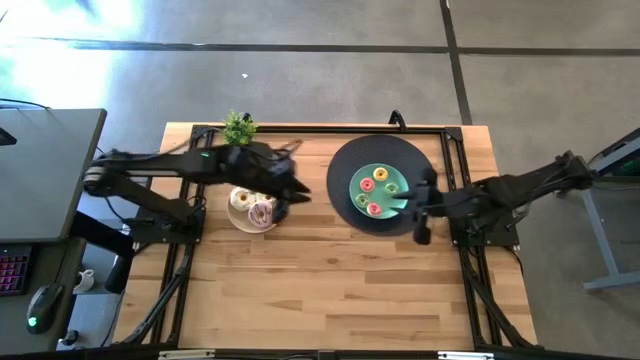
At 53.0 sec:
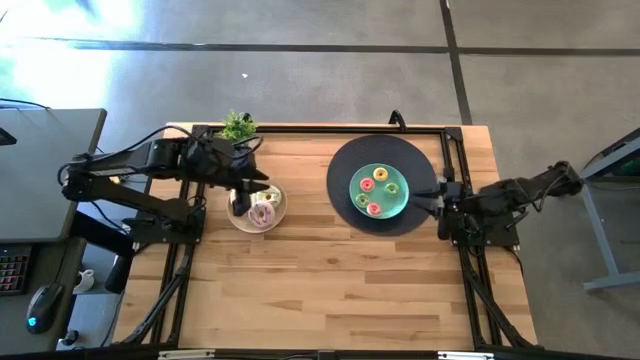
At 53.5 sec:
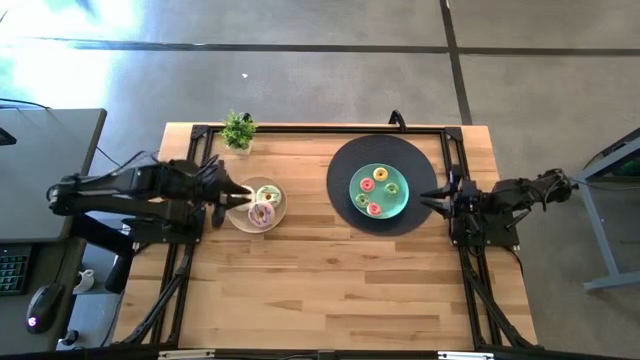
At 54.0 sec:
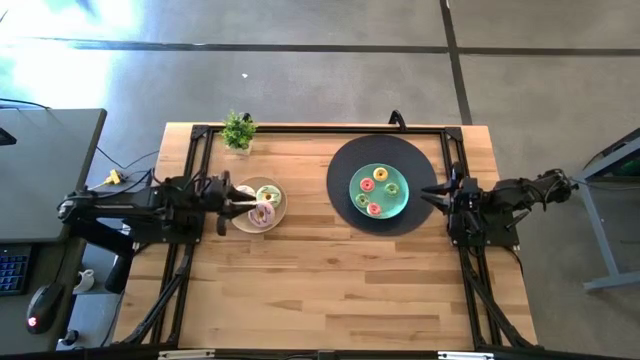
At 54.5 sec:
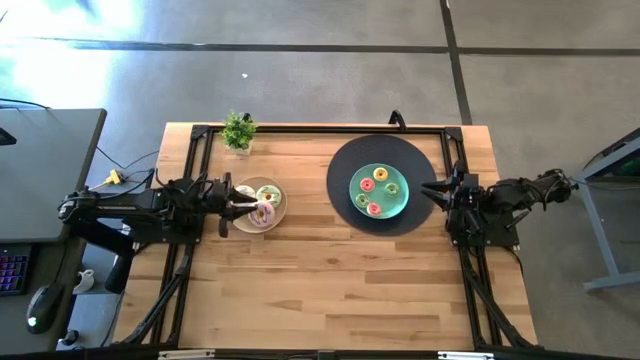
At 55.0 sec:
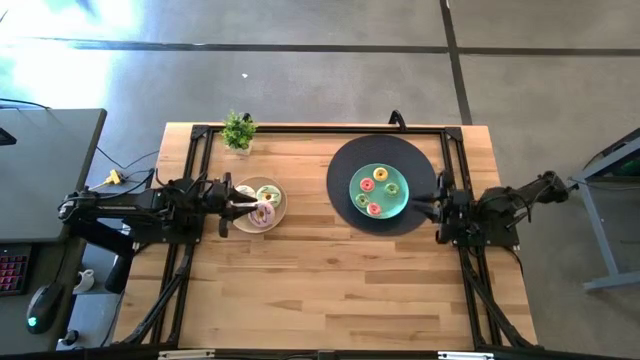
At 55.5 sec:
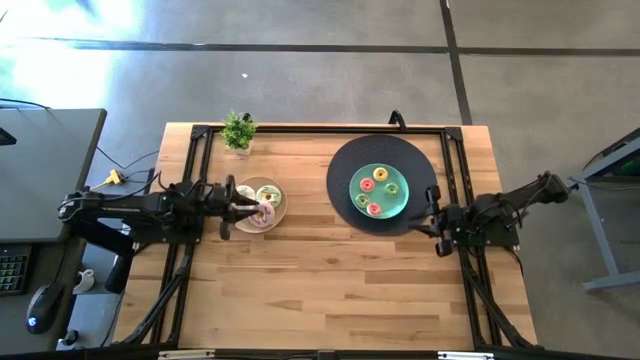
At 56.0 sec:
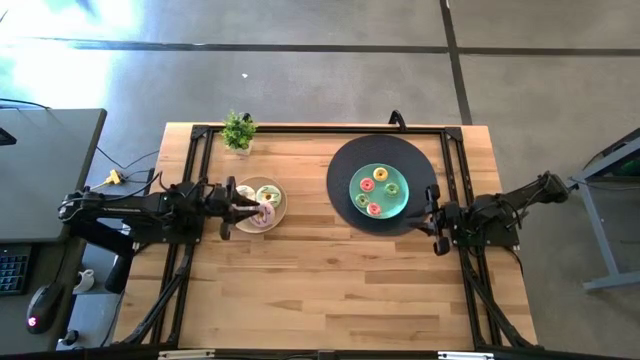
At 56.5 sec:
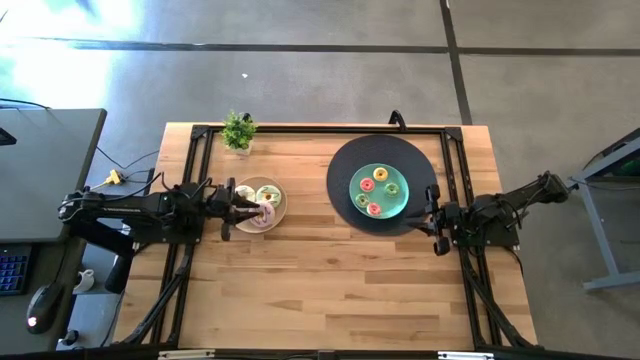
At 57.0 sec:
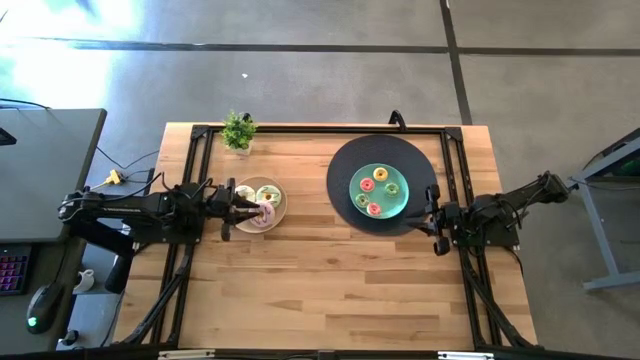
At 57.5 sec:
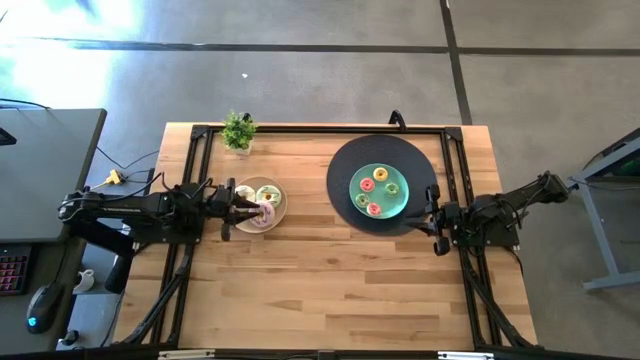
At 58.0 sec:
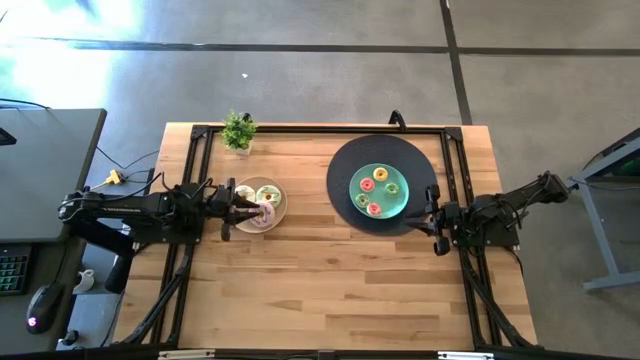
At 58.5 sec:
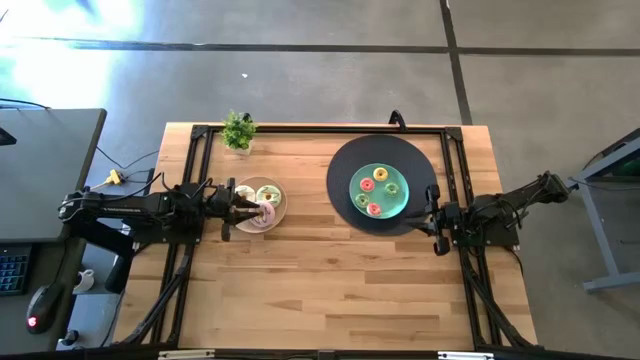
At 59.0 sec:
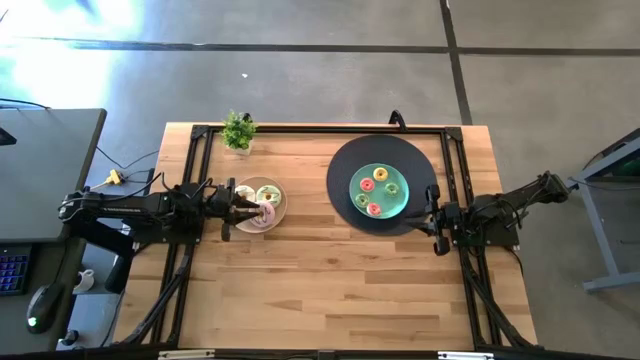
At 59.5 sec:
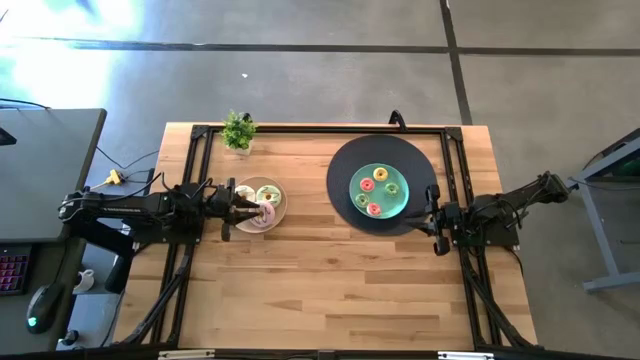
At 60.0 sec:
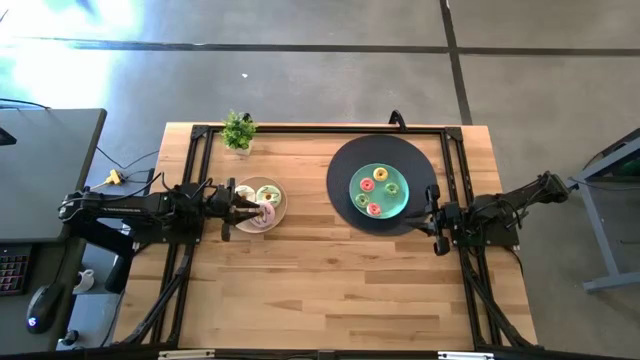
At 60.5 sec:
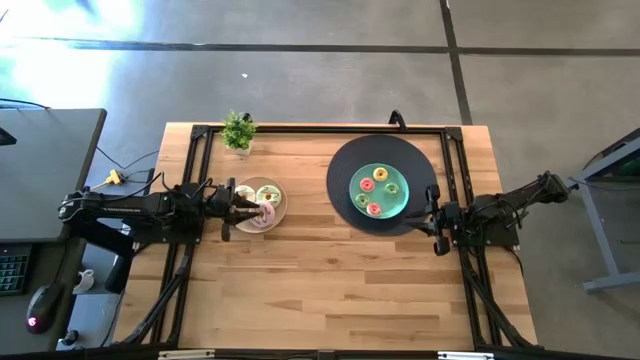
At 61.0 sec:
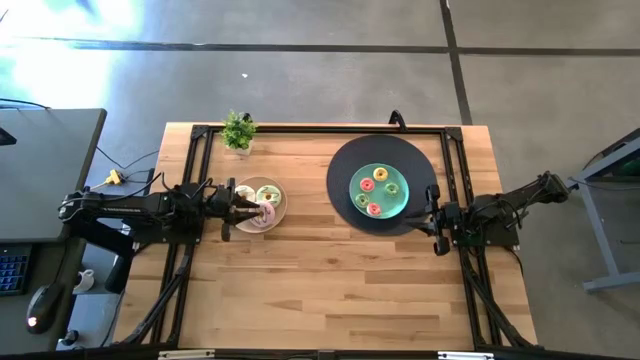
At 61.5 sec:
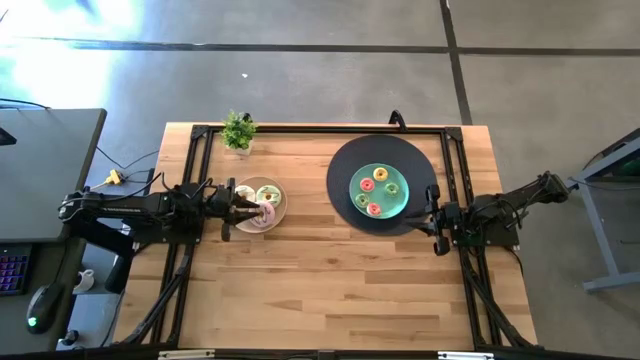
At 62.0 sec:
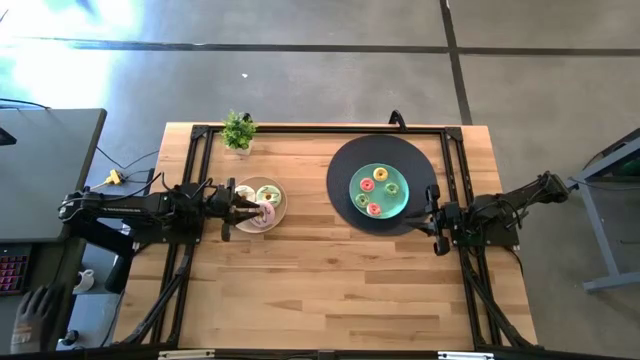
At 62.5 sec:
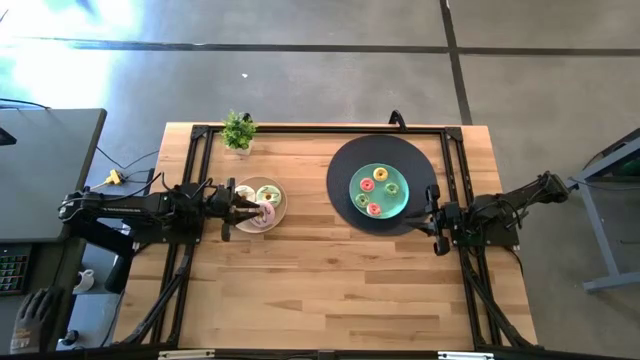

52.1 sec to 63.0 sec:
Task: Pick & Place donuts
Return to Home Position

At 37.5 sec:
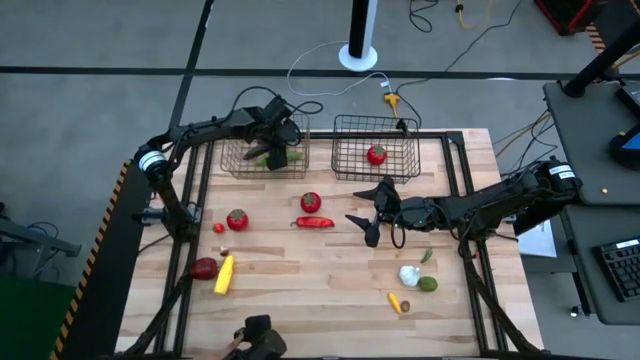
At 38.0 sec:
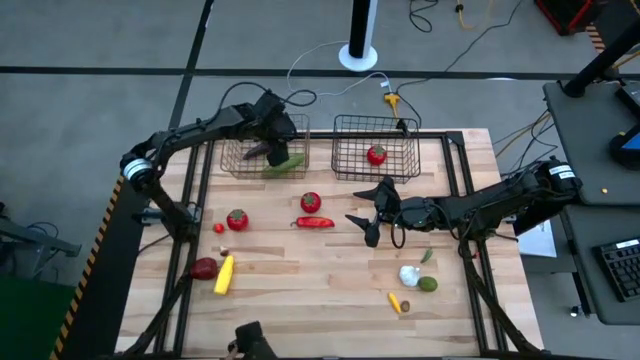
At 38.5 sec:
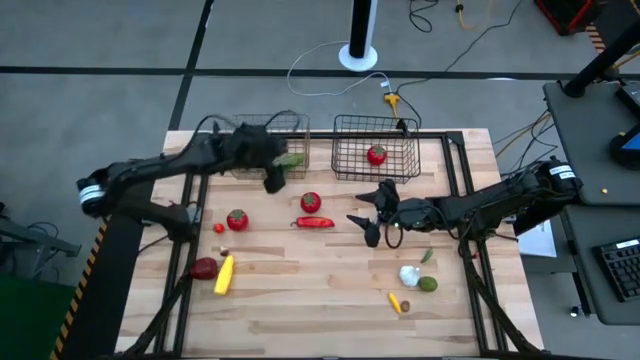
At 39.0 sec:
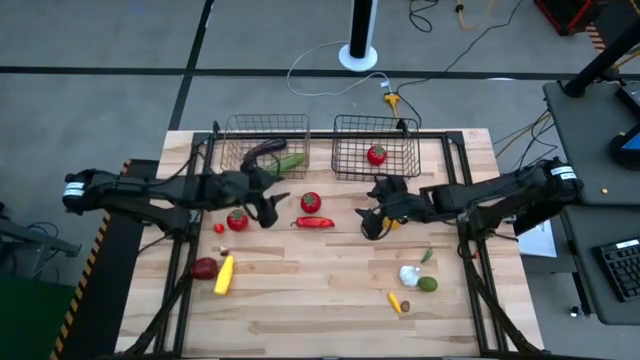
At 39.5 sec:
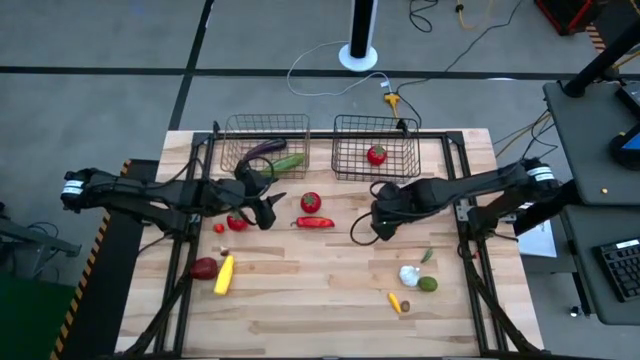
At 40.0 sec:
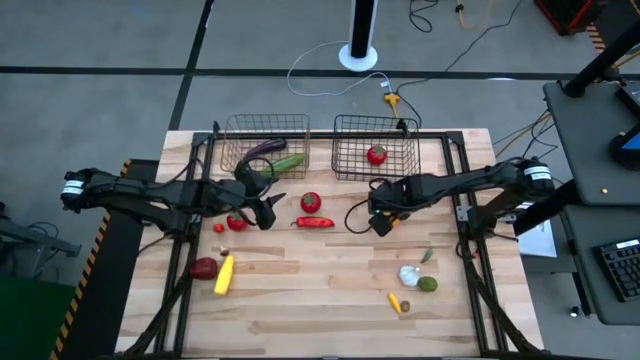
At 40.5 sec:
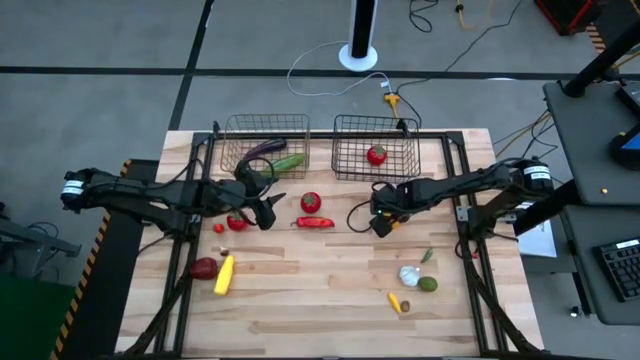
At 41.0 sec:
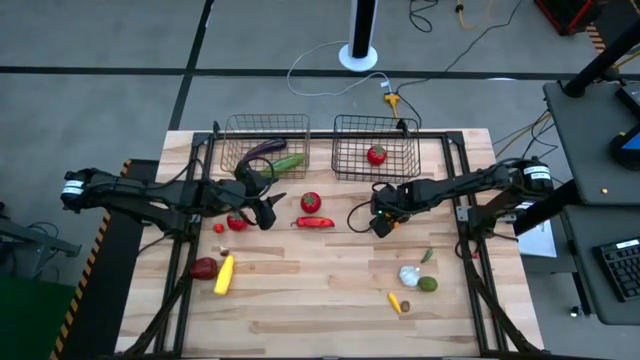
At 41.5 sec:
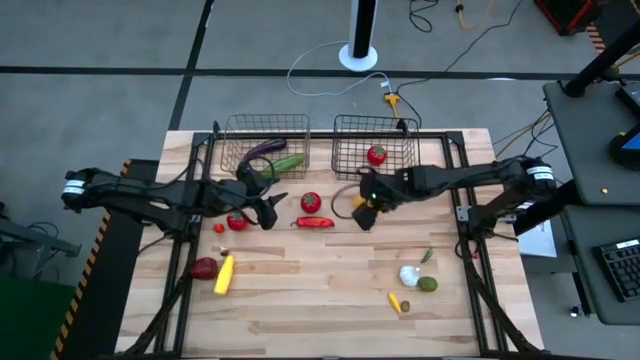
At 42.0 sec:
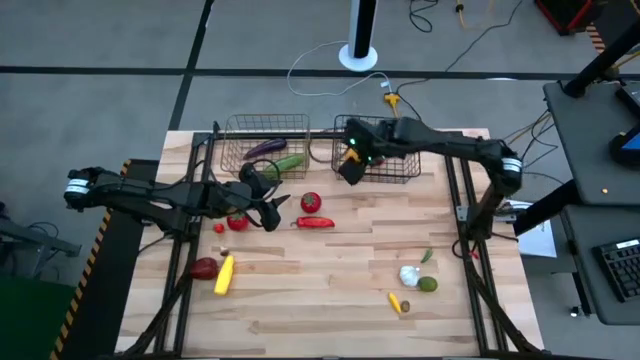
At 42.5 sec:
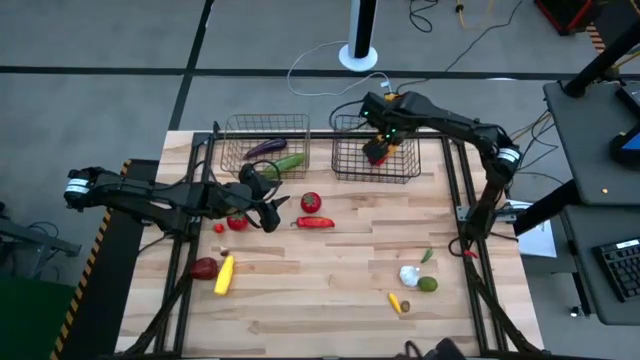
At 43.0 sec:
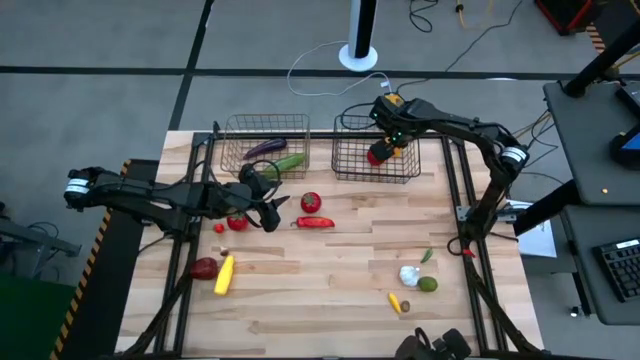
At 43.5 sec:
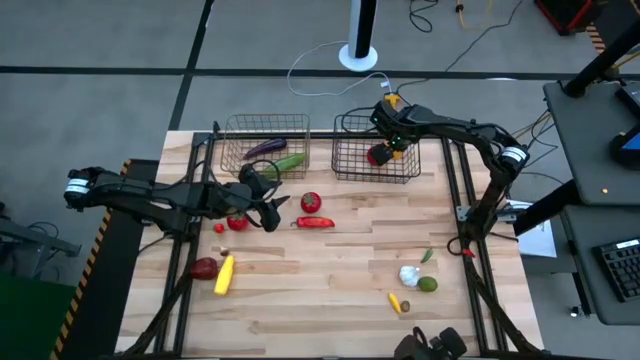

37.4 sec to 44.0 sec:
Task: Sort produce into baskets
Put the yellow lemon into the right wire basket
